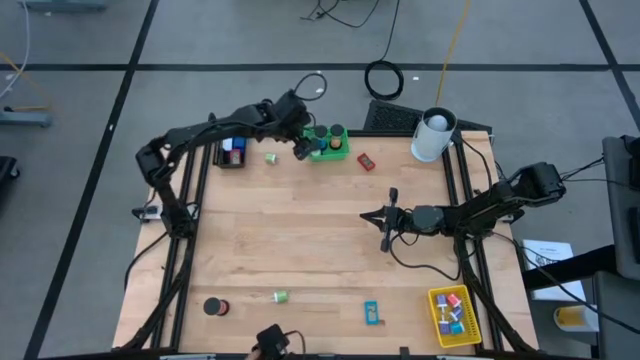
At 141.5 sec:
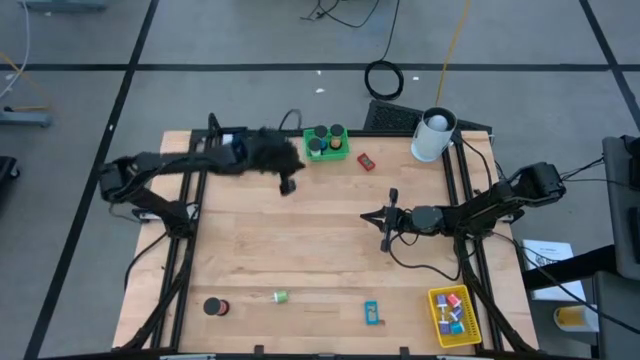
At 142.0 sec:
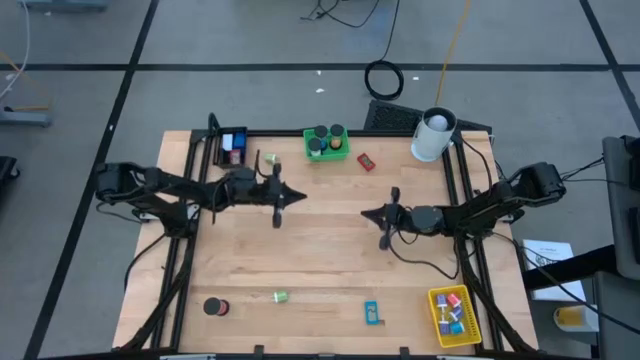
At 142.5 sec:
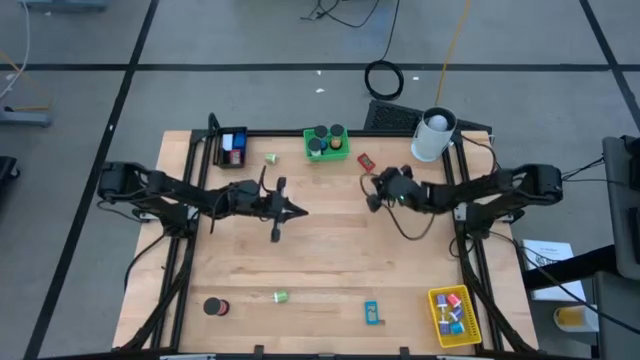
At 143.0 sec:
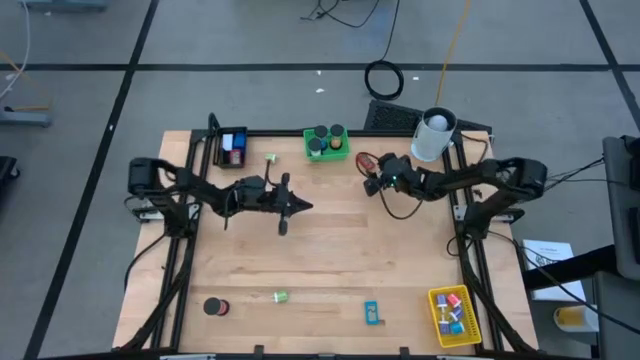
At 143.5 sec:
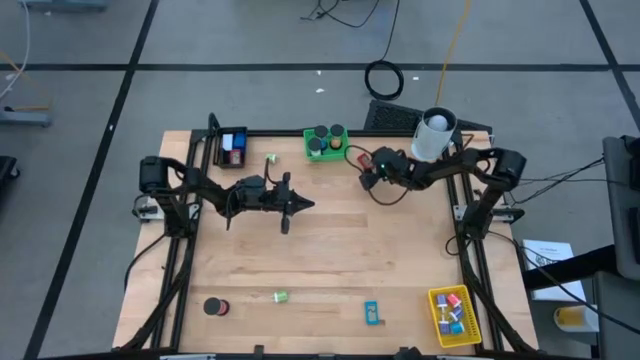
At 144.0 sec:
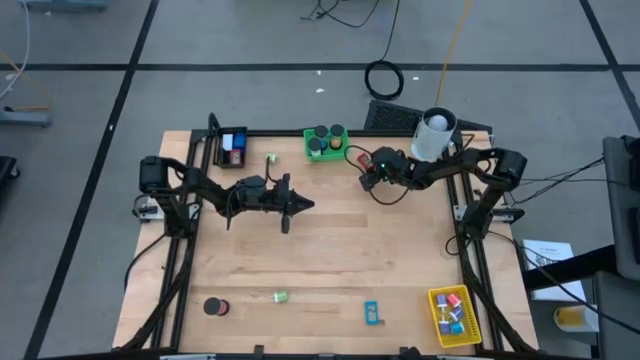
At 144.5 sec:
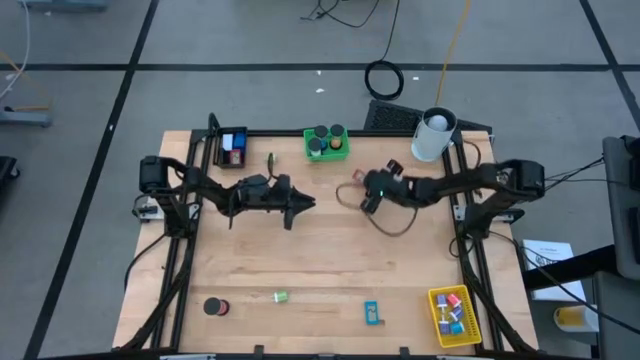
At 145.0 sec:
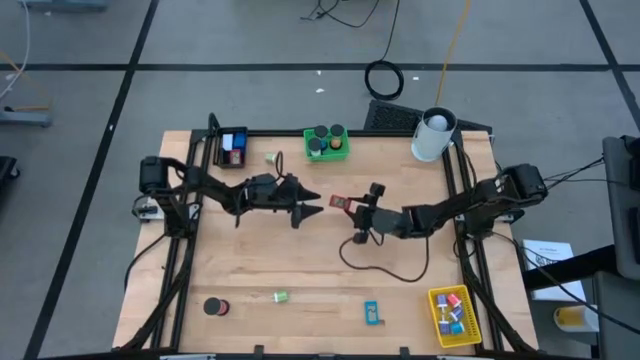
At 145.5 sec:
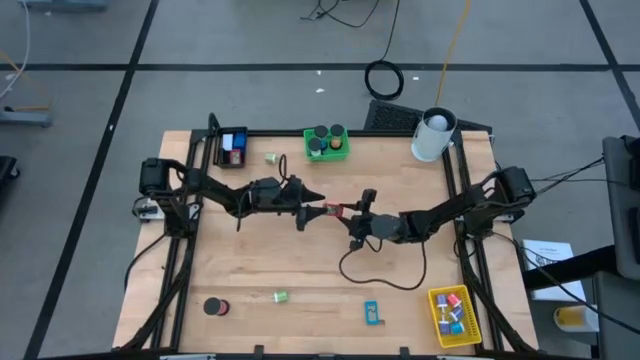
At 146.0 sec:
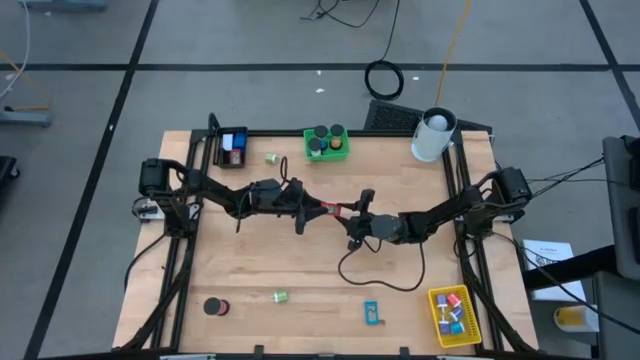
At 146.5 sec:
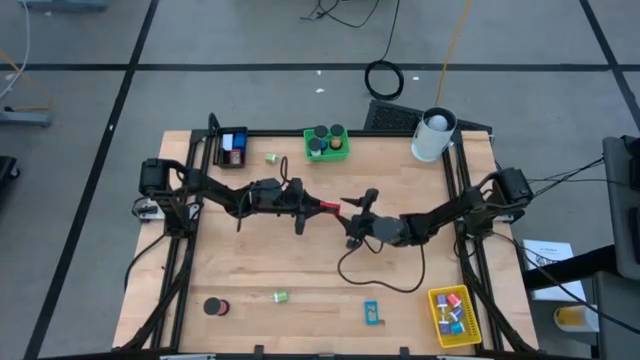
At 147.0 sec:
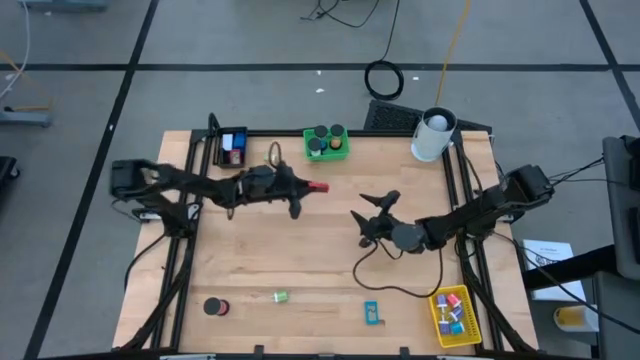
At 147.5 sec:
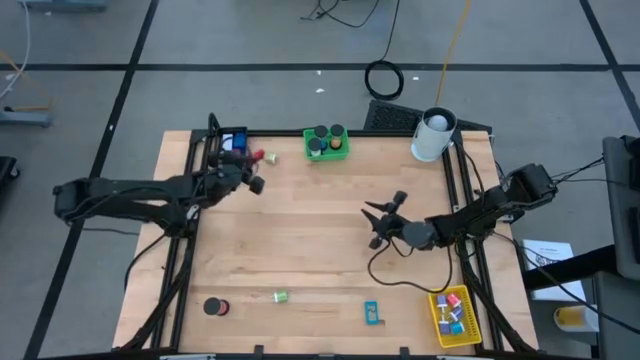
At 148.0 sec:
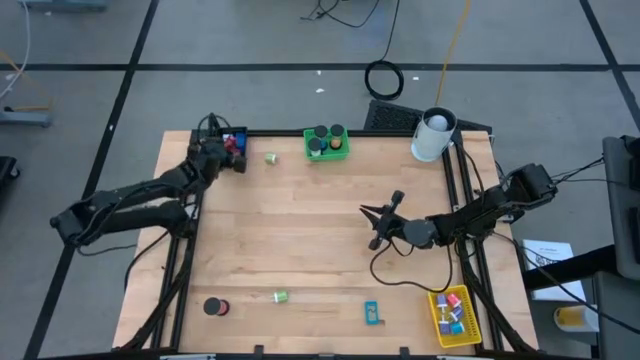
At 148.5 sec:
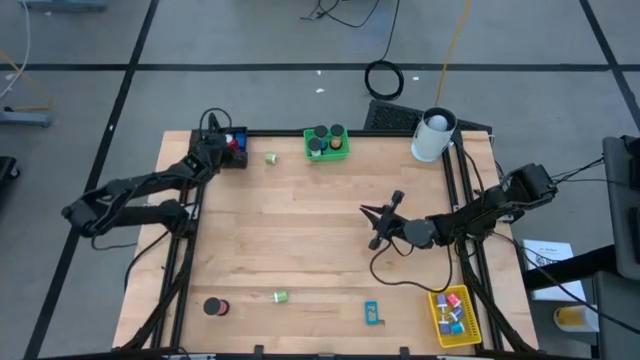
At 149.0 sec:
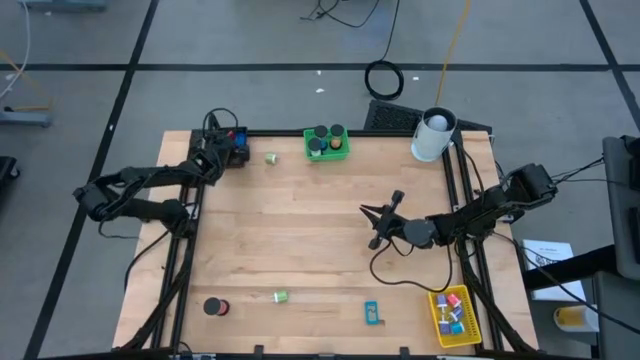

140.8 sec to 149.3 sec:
Task: Pick & Place Office items
Put the red digital clock into the black basket

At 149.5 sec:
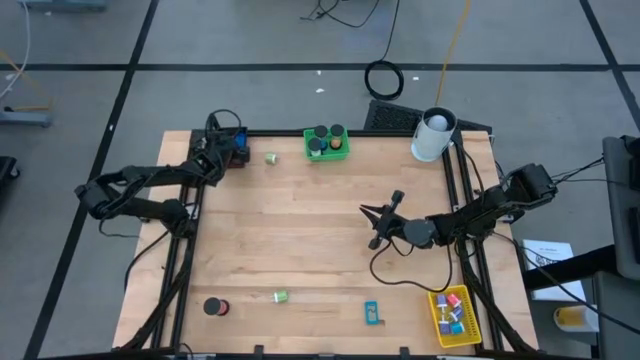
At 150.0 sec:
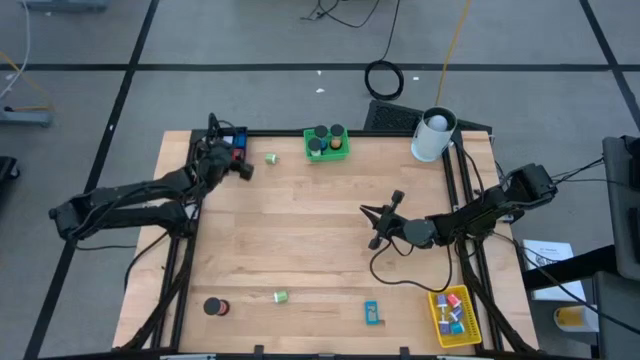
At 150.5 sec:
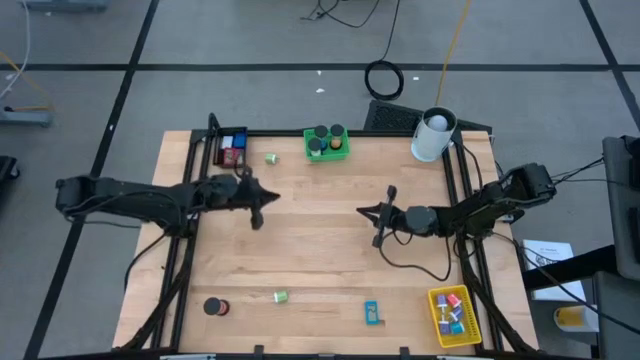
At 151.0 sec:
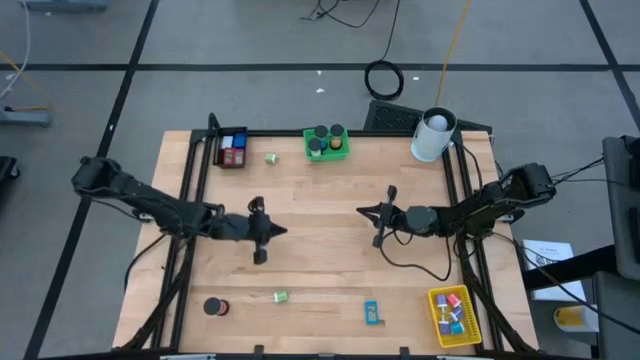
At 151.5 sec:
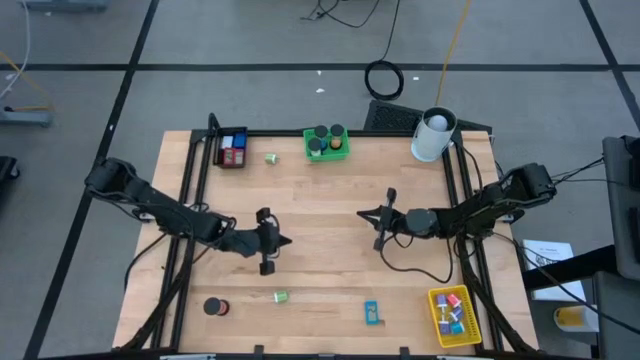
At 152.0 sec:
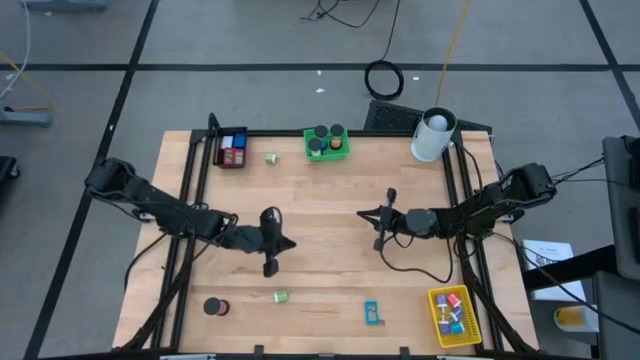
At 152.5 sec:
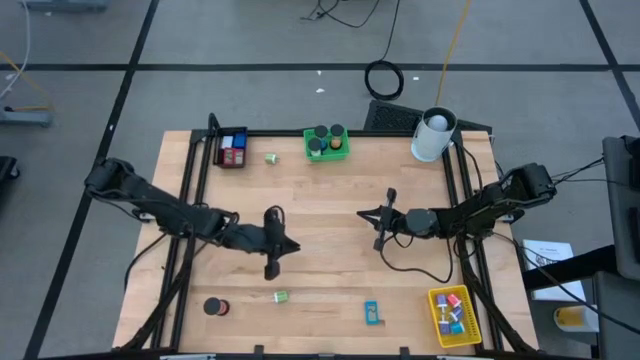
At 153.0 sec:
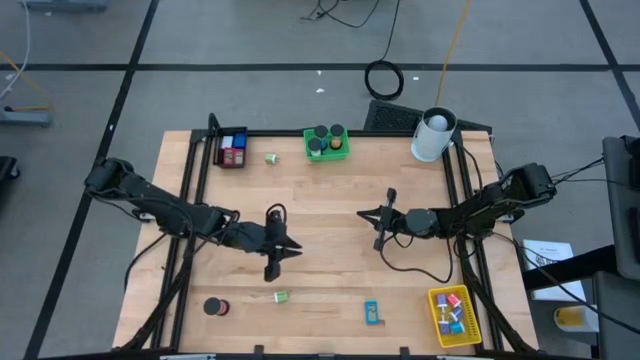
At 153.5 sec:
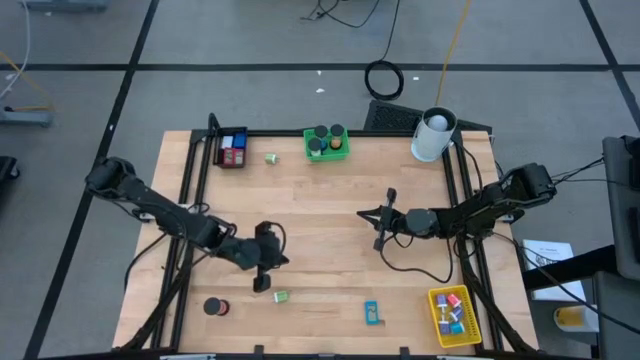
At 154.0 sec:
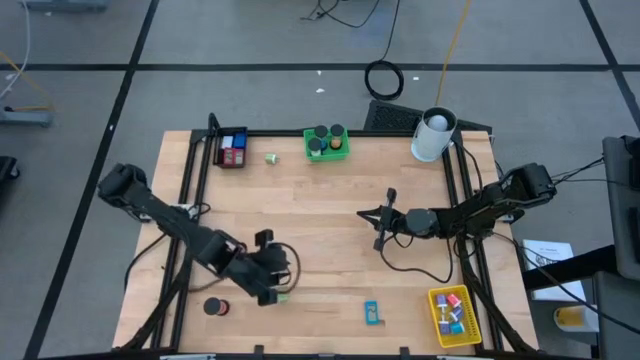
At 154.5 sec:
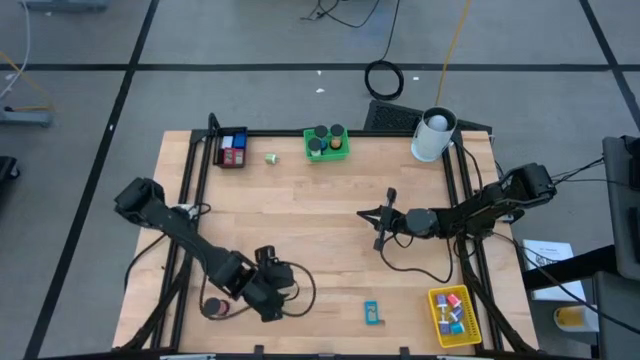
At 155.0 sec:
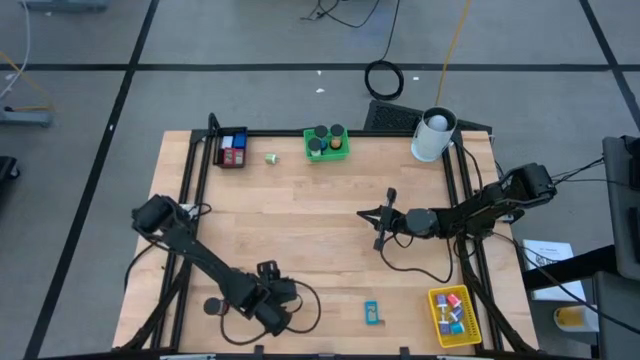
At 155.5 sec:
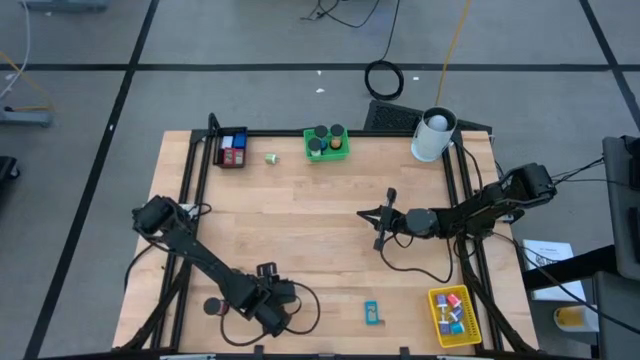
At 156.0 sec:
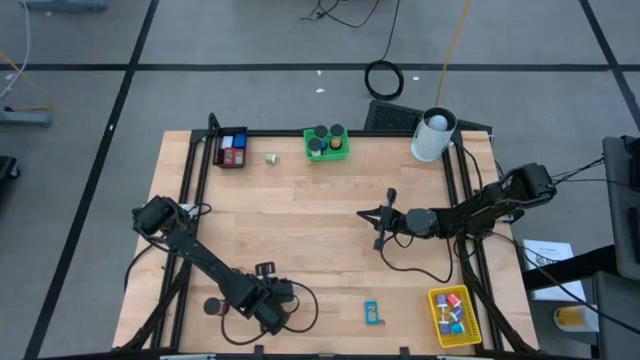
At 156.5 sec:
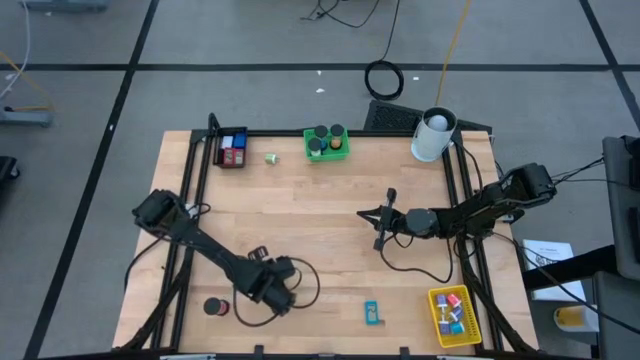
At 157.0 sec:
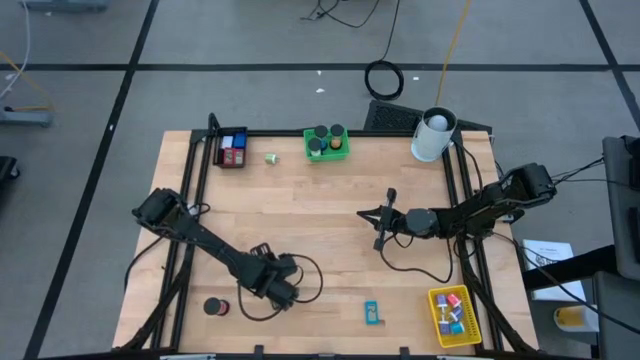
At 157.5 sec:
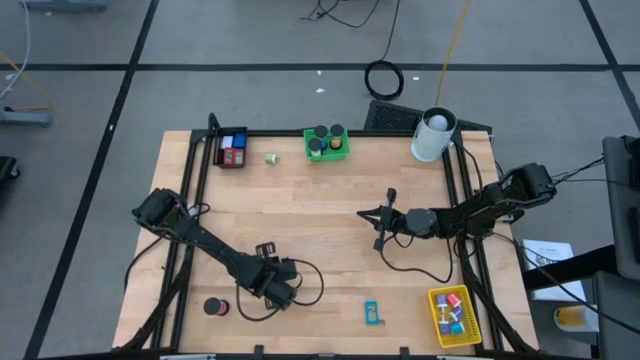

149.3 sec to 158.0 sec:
Put the bottom green charger adapter into the yellow basket

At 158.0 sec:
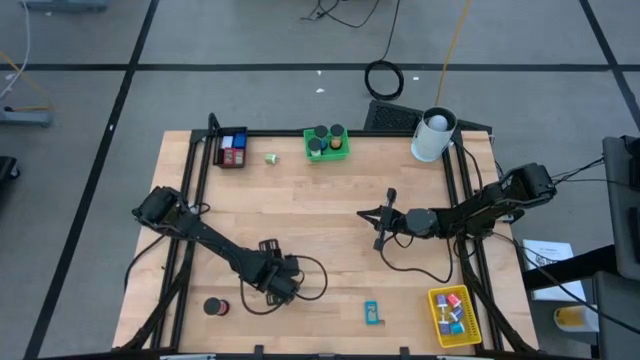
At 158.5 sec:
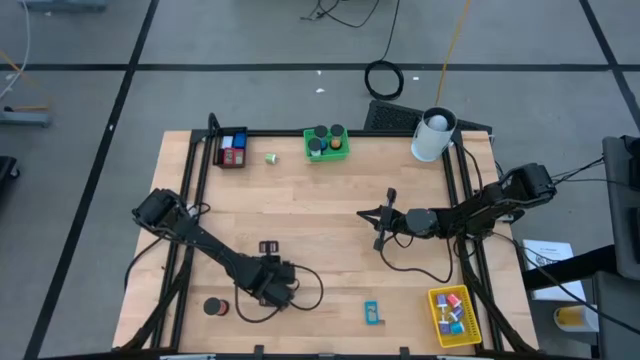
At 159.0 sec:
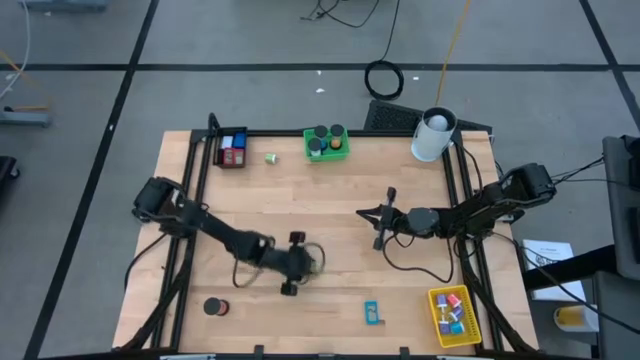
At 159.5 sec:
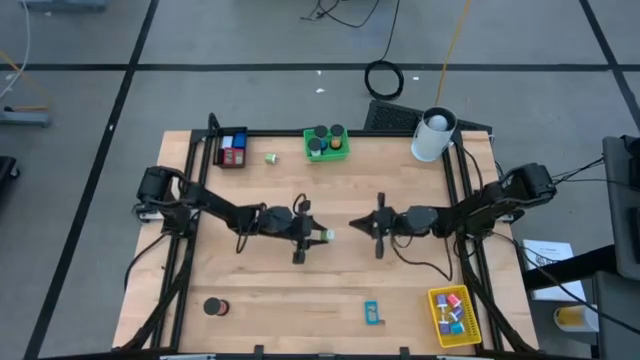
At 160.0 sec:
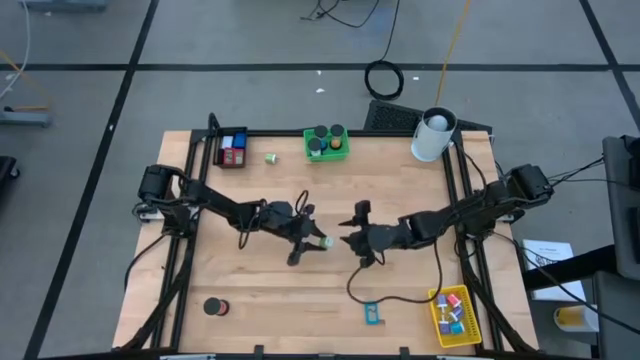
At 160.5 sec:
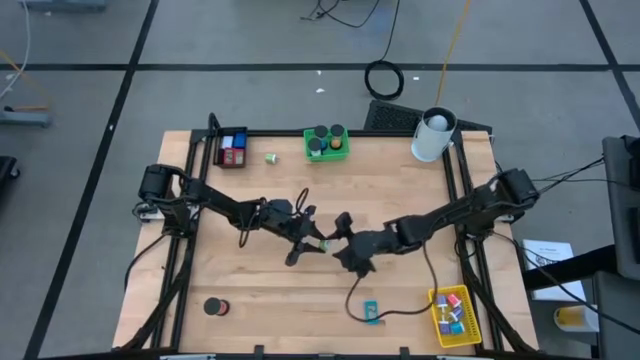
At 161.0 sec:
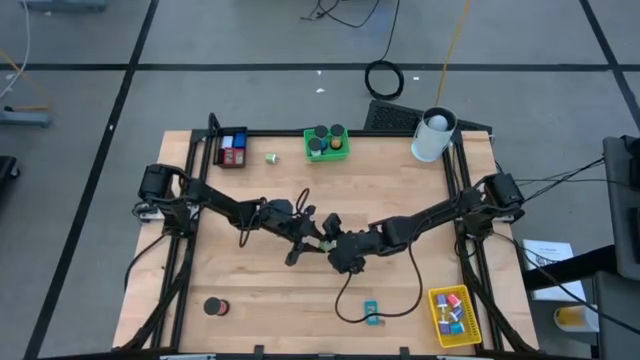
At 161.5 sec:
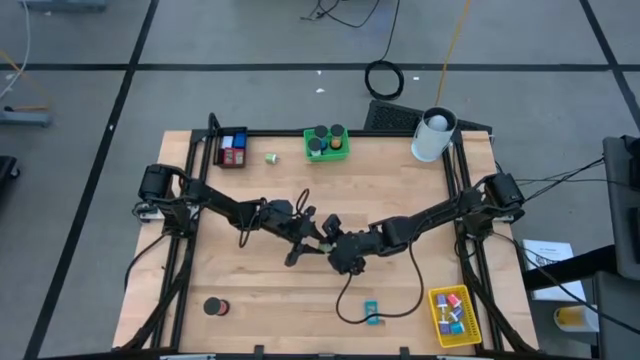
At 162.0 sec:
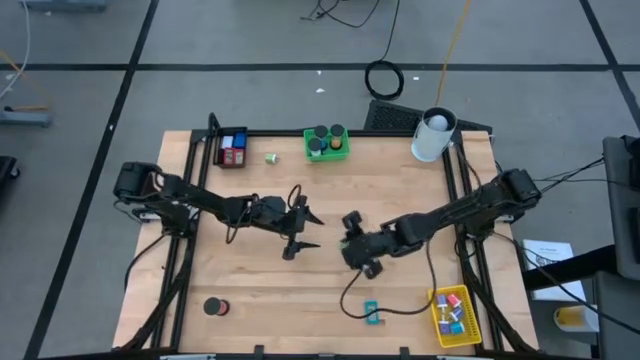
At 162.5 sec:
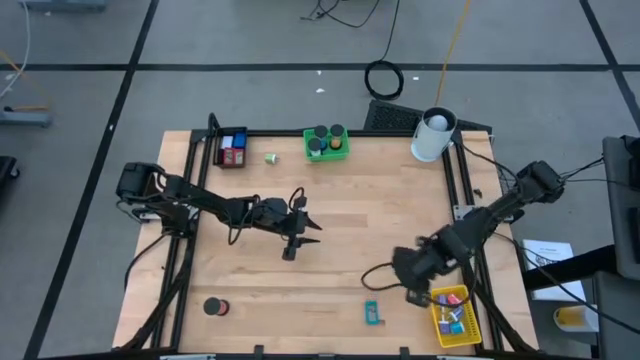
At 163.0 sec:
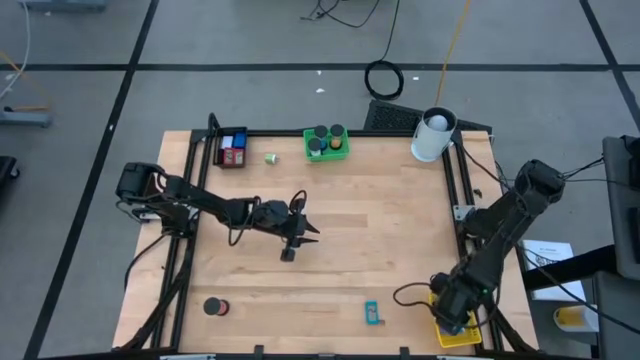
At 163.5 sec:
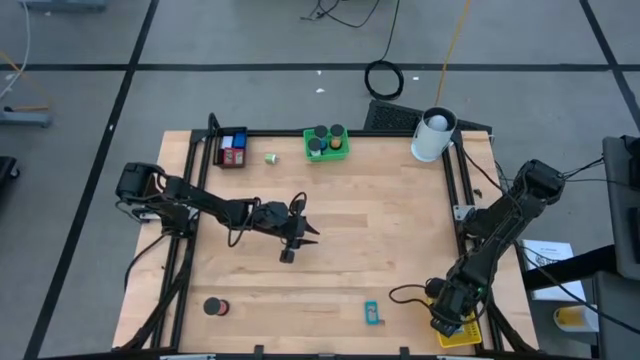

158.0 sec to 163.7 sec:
Put the bottom green charger adapter into the yellow basket
